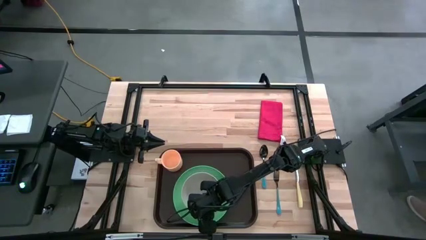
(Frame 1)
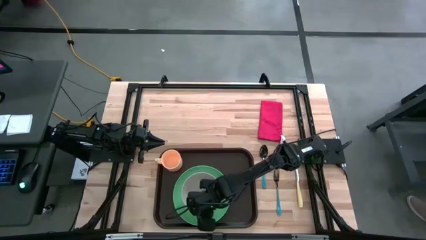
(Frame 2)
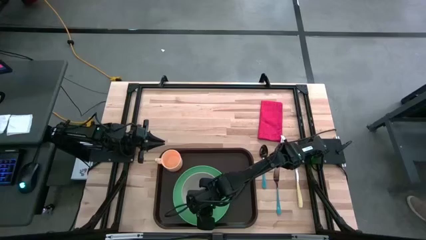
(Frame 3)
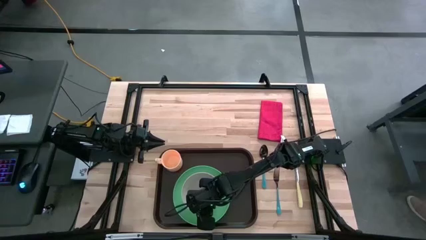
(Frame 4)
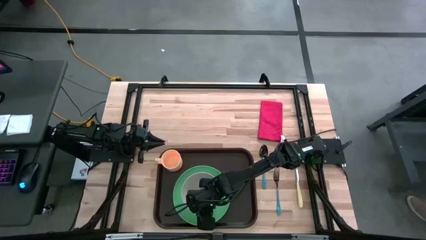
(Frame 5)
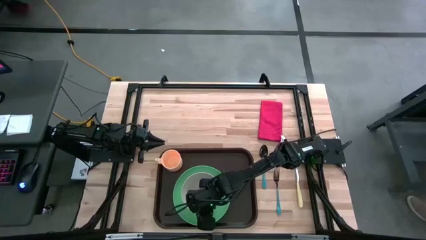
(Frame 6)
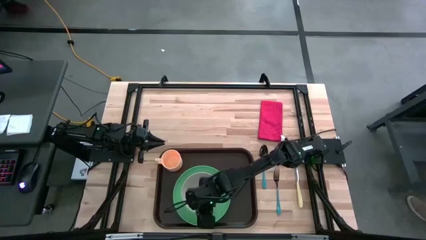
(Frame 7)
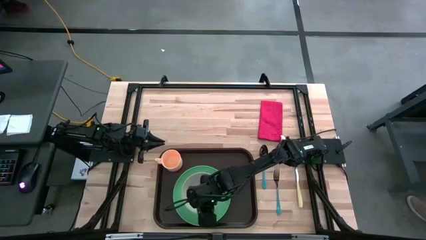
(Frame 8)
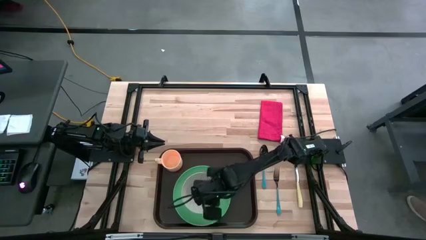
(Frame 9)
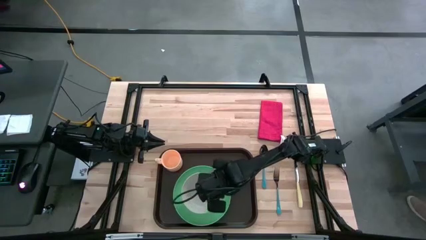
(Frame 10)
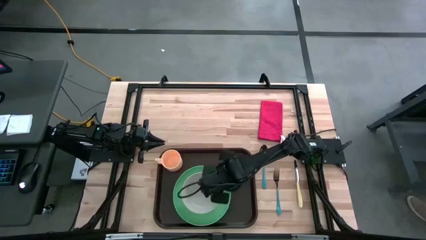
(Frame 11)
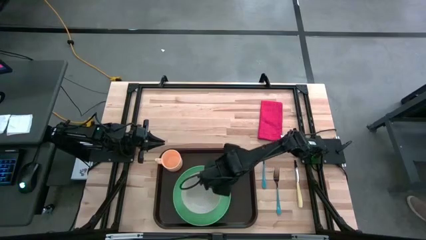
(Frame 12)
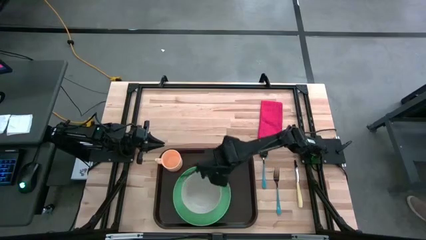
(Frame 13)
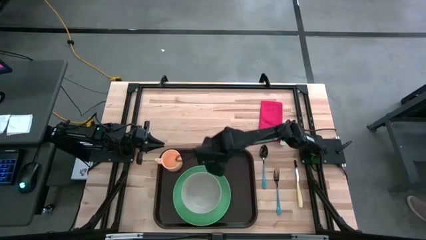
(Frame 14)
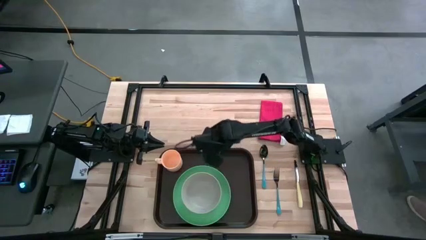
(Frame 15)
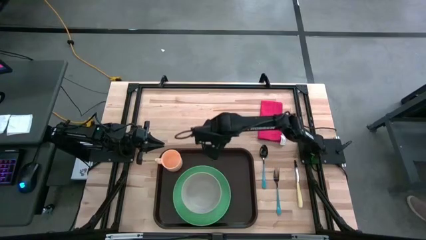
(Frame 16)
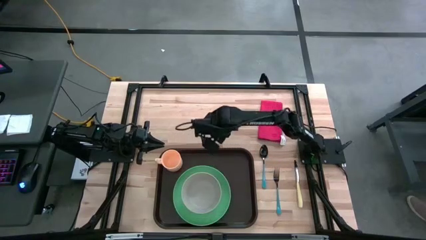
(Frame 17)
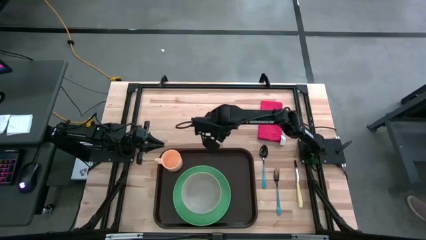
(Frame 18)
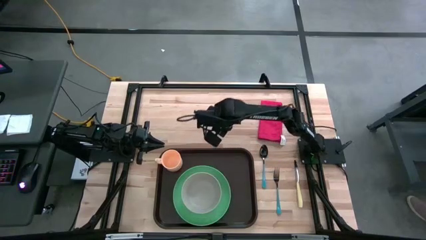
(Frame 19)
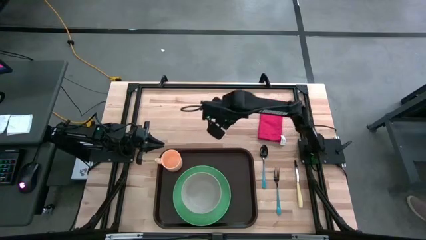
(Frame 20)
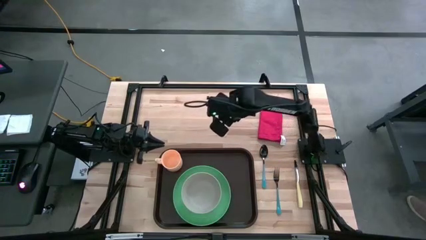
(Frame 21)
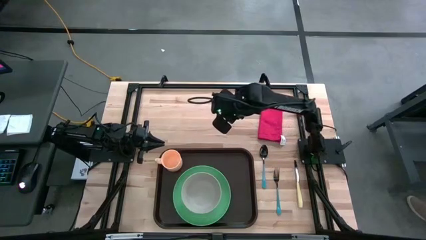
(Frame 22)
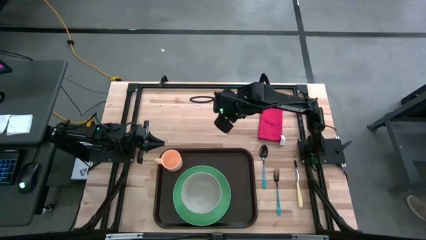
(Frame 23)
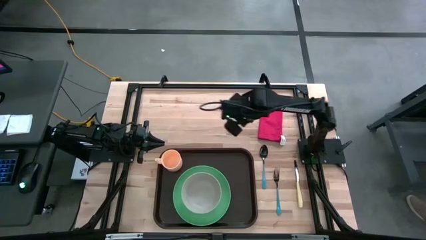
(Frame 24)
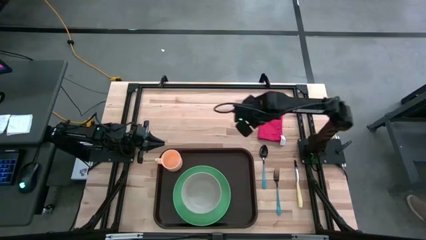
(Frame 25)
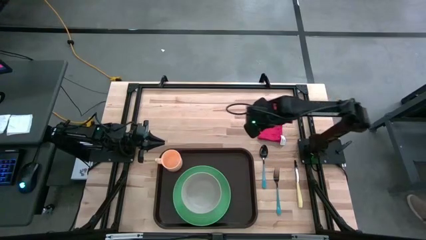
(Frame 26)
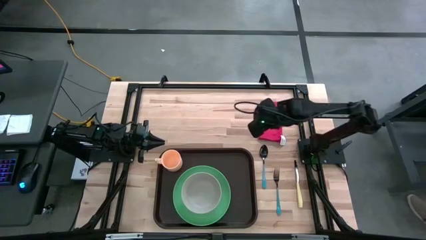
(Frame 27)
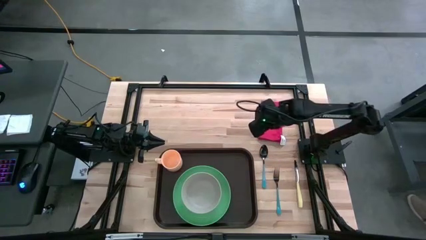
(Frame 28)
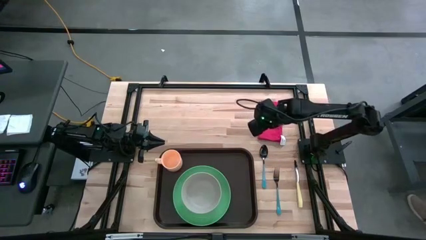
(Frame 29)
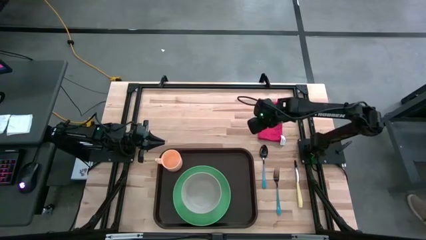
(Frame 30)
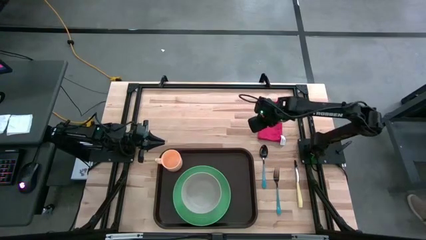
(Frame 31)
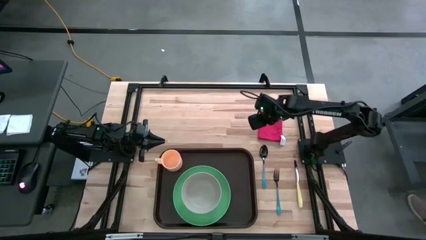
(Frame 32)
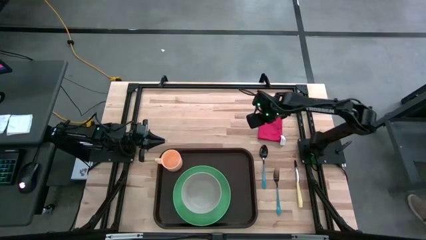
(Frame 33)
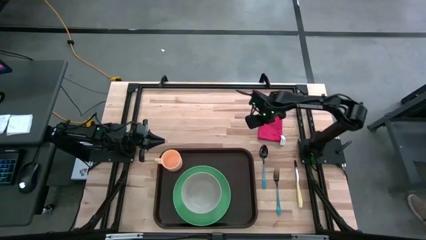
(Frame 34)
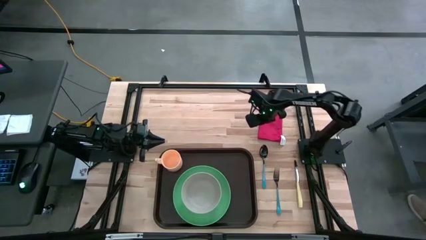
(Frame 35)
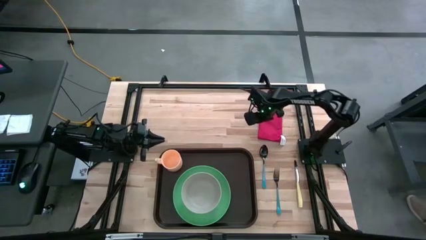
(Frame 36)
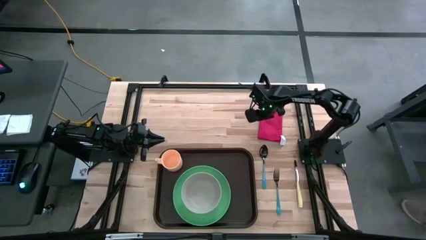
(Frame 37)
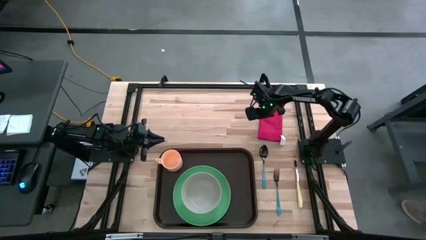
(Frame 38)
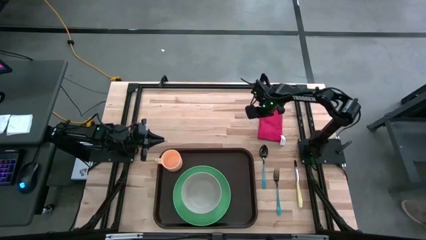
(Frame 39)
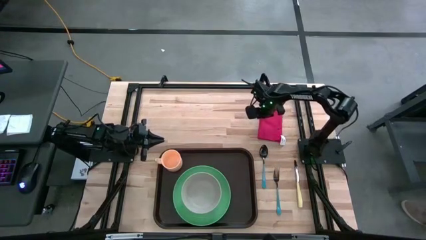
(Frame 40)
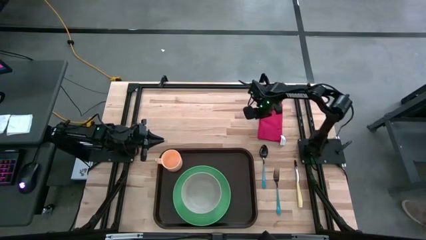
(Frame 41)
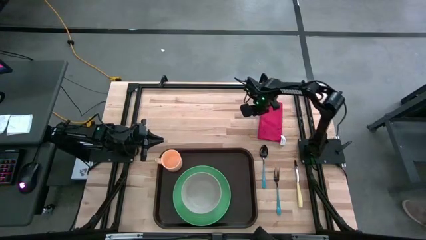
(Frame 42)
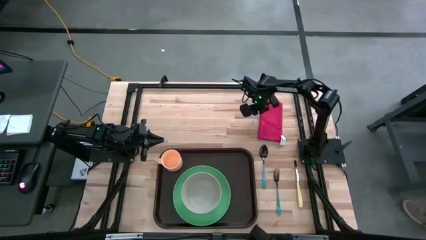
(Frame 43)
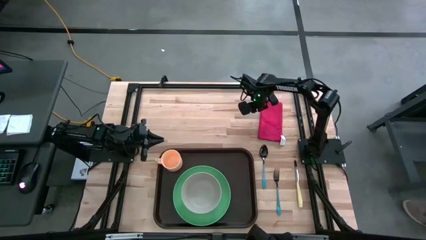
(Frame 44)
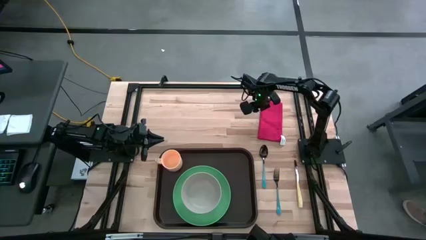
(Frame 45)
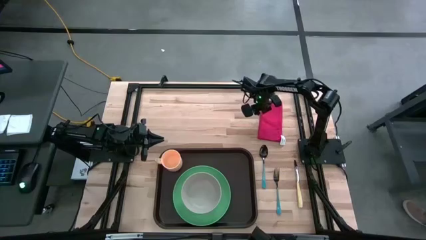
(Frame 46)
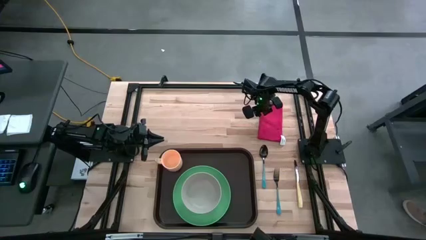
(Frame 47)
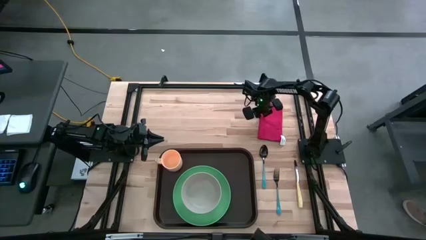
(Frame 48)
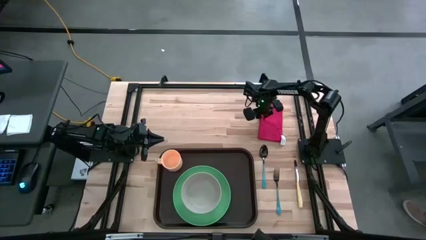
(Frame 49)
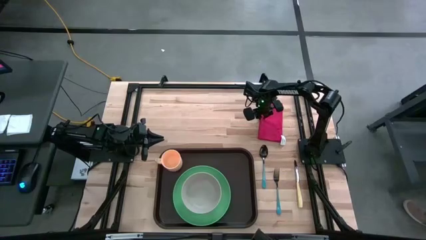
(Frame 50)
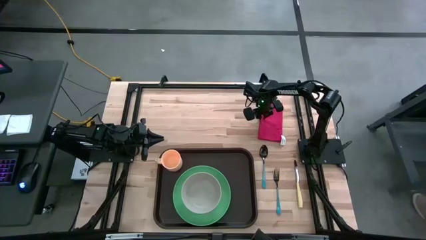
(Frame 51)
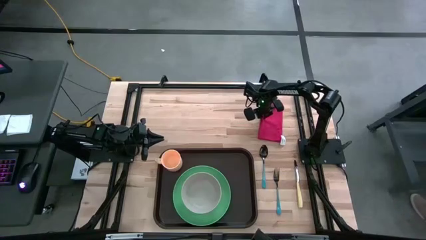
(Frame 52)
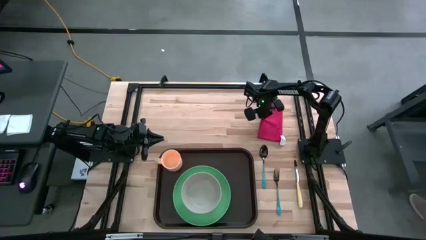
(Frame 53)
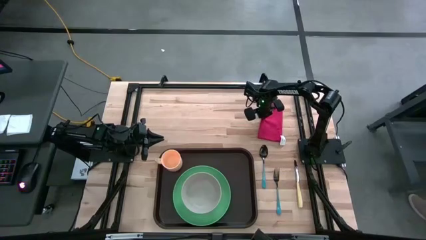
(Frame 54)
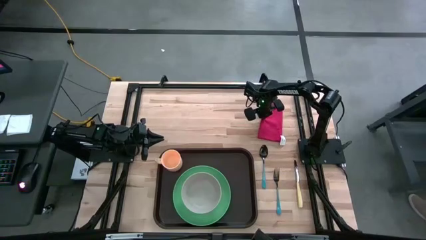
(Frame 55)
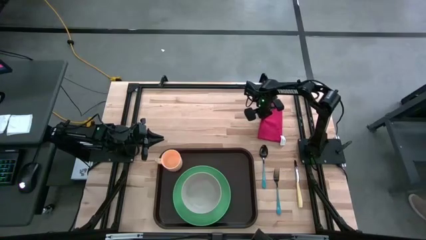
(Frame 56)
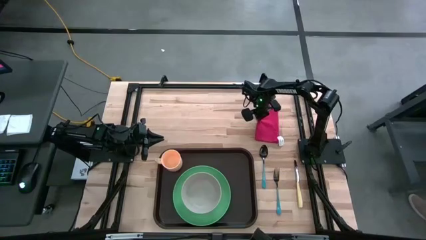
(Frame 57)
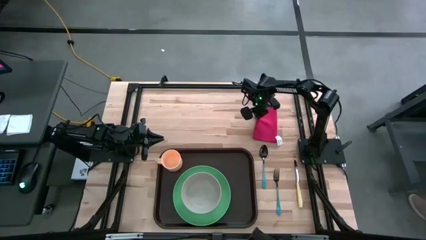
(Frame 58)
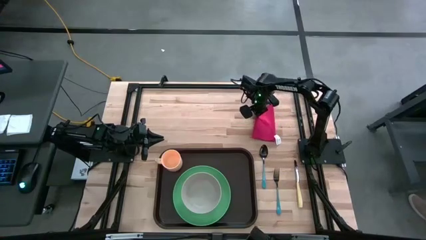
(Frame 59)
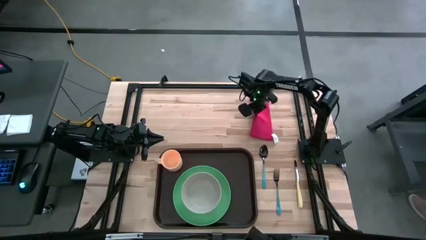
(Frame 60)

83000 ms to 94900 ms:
Task: Set up tray
Put the red table napkin to the right of the green plate on the brown tray

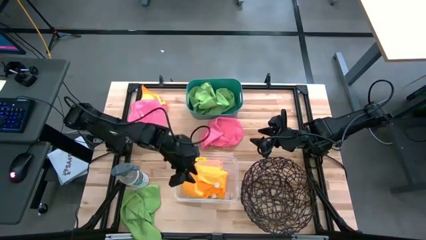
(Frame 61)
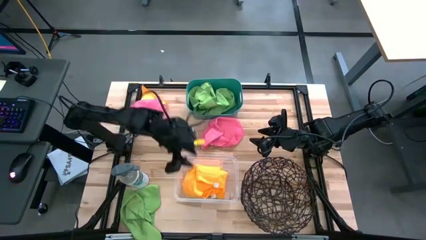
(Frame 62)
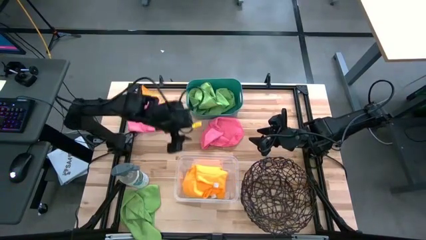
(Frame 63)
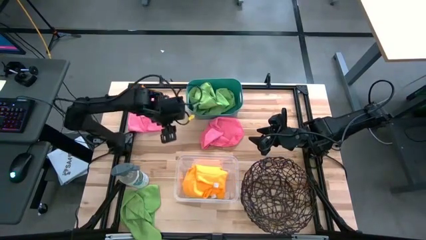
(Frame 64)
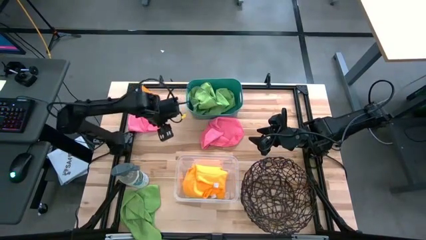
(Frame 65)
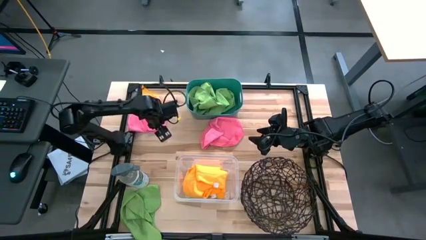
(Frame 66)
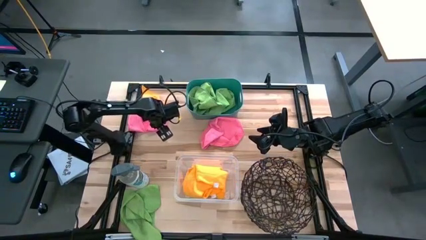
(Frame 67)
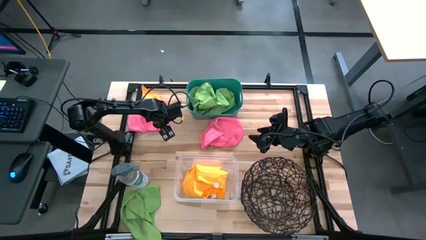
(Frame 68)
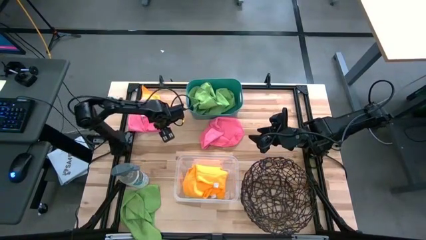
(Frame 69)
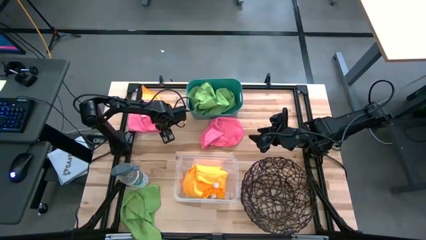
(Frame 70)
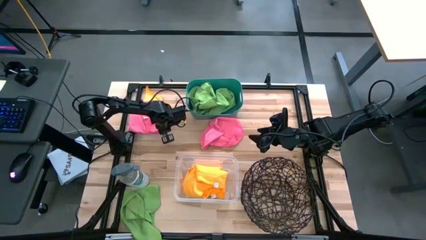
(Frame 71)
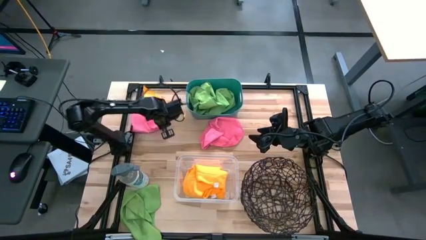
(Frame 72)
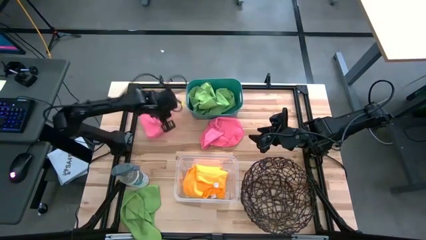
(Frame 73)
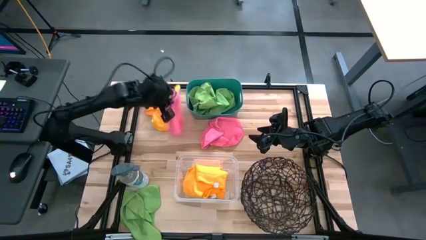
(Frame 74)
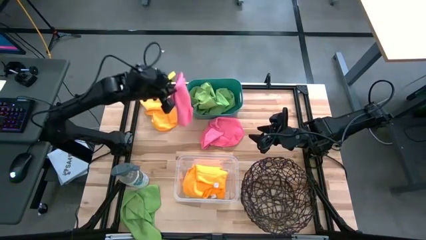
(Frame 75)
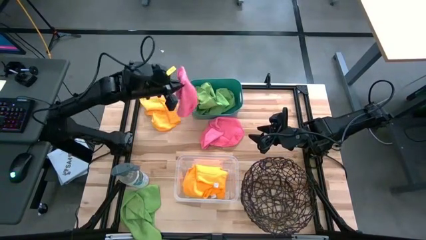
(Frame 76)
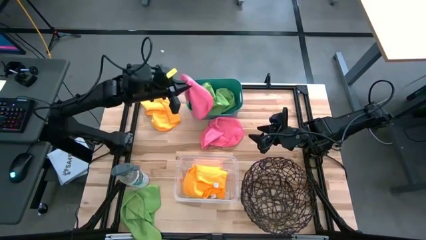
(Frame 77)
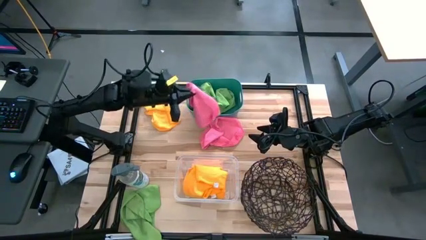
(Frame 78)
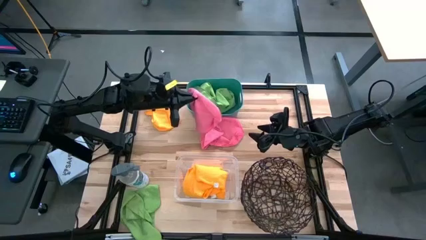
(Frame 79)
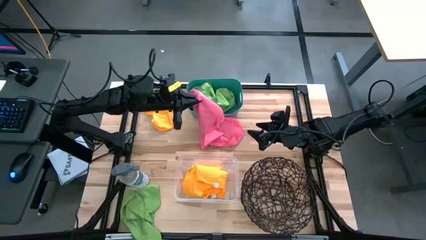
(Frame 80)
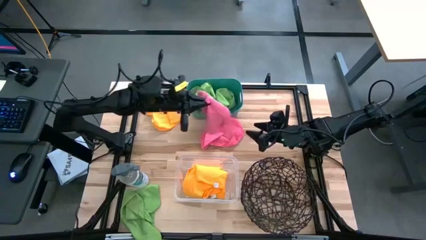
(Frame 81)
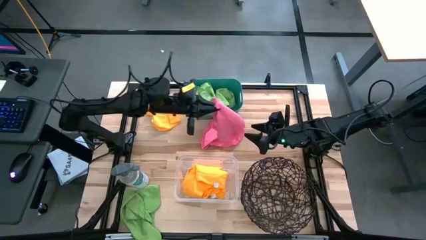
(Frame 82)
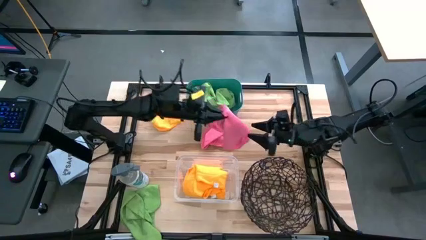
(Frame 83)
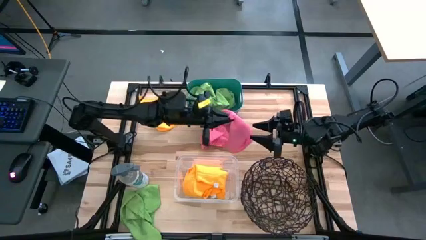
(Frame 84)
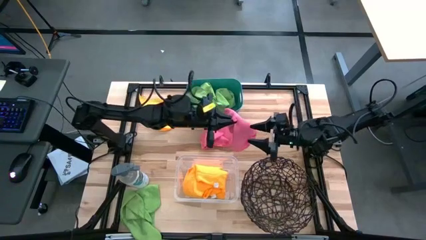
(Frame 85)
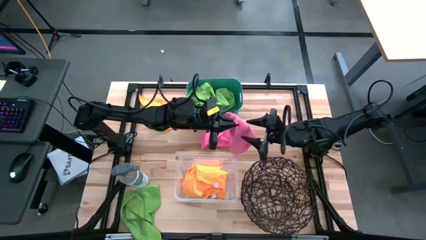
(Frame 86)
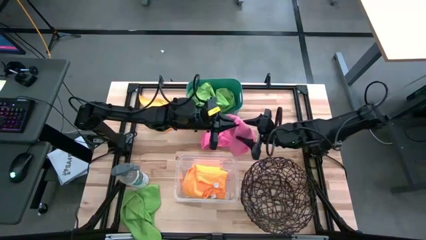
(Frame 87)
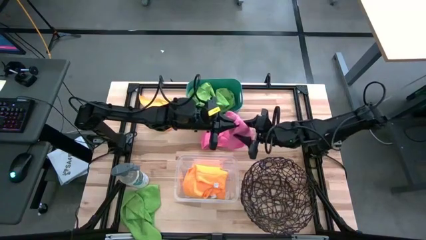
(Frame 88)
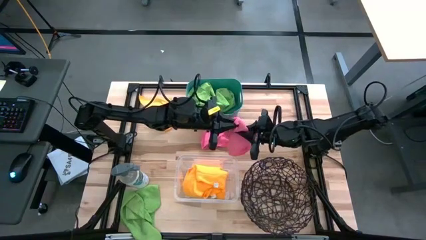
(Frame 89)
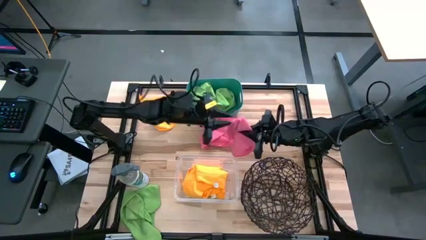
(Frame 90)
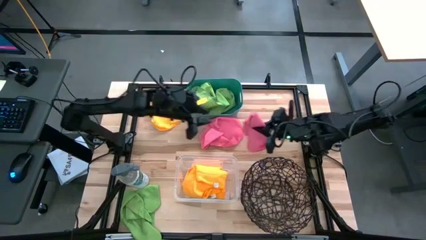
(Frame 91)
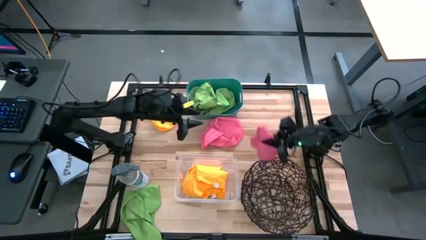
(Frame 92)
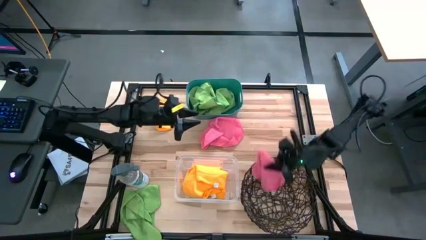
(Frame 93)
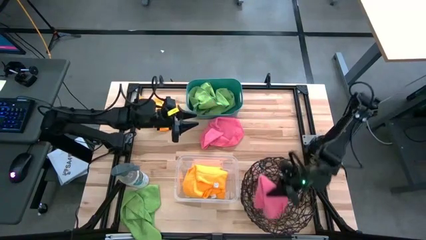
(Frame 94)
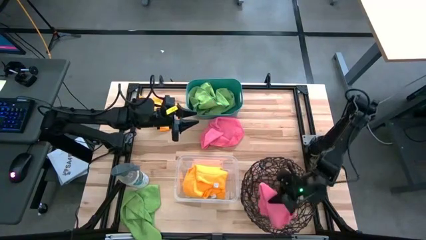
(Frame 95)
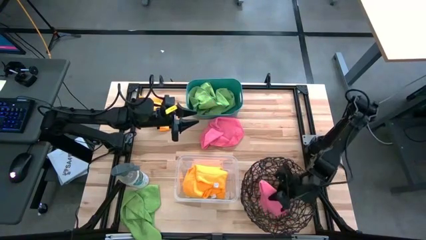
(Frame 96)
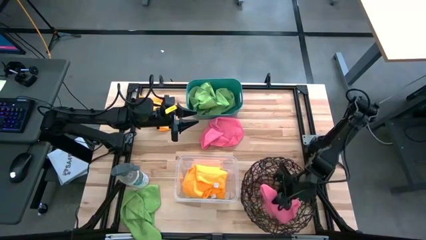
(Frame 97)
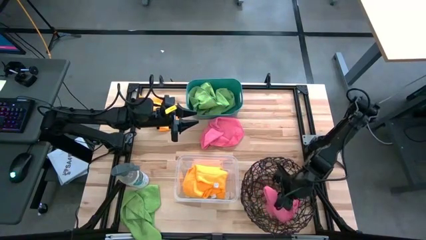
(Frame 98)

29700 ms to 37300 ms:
Task: Sort microfiber towel by color & place in baskets
Put the pink microfiber cloth into the basket
